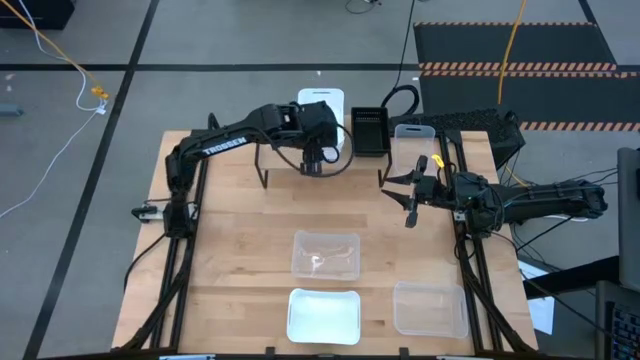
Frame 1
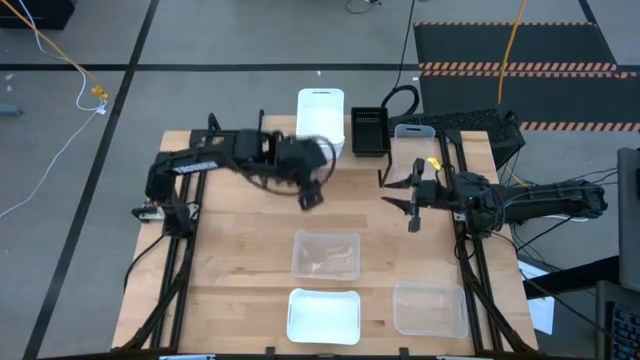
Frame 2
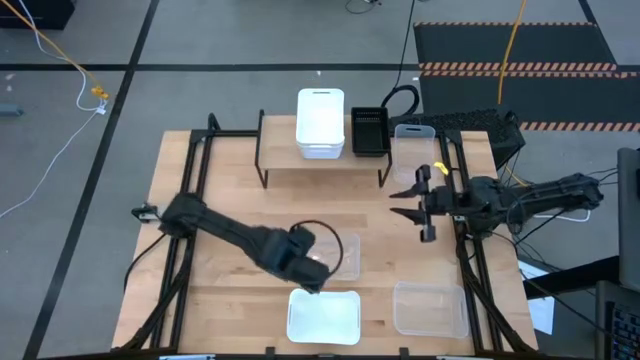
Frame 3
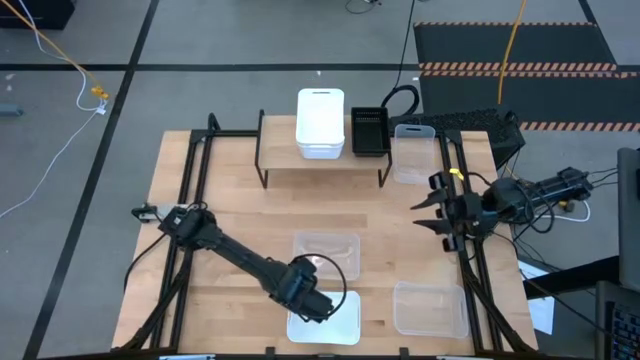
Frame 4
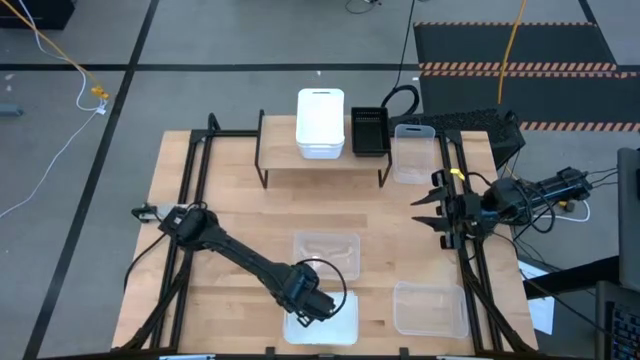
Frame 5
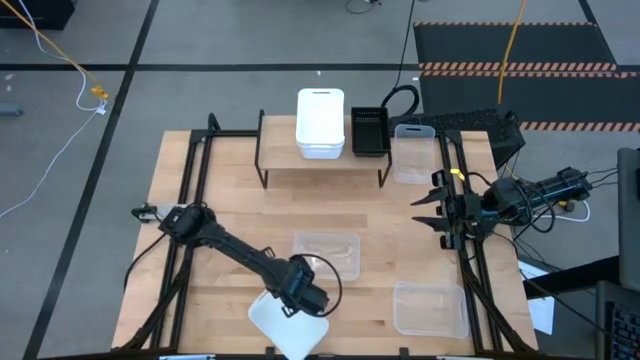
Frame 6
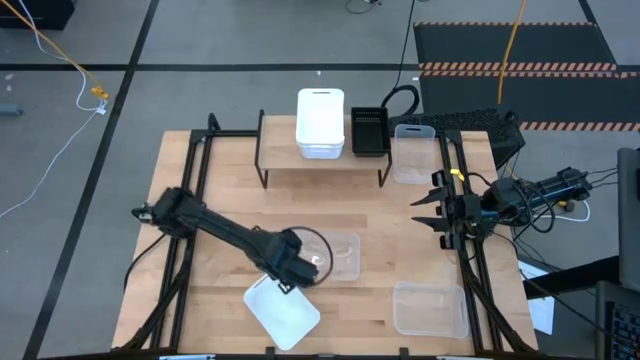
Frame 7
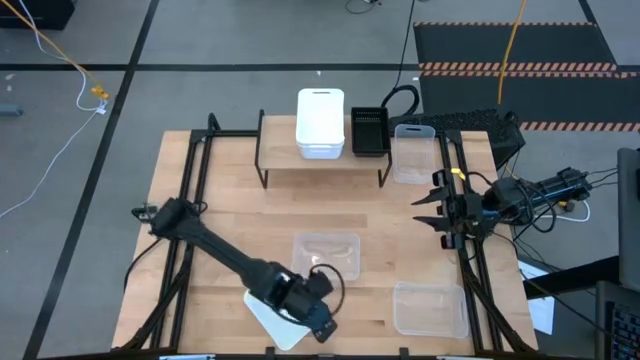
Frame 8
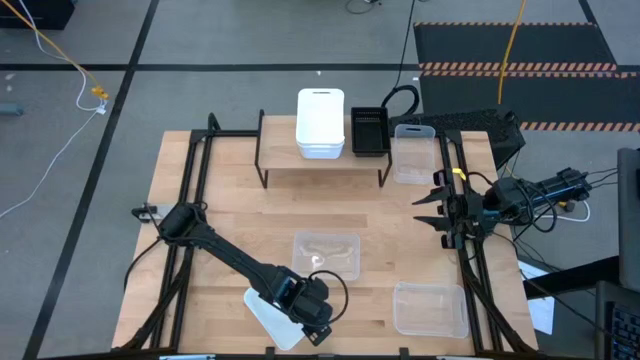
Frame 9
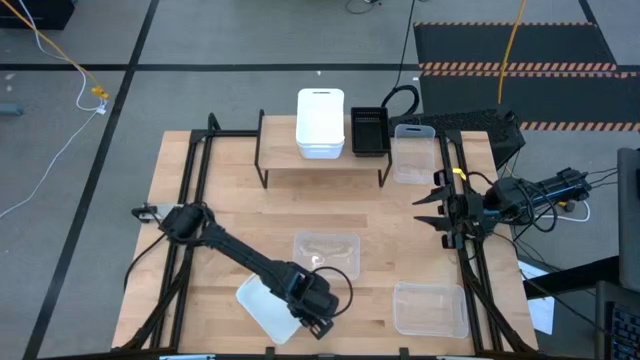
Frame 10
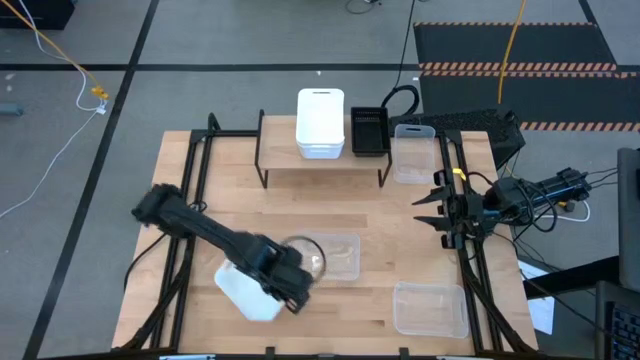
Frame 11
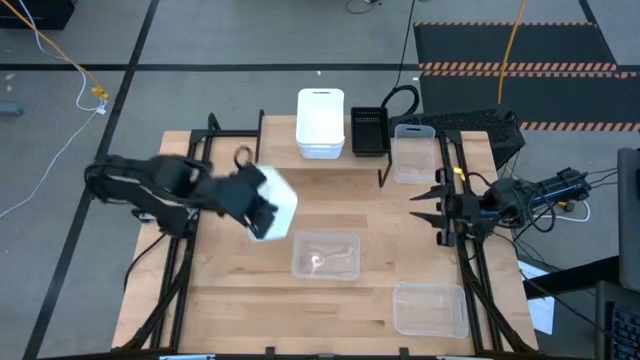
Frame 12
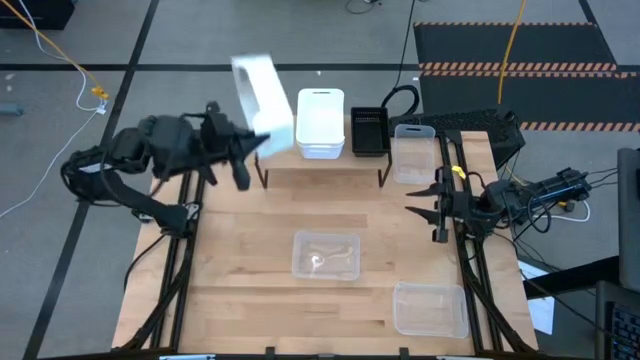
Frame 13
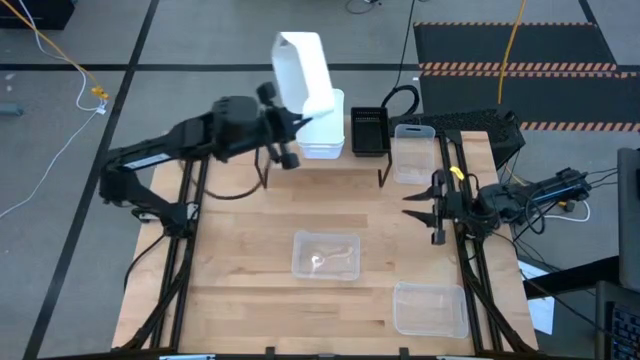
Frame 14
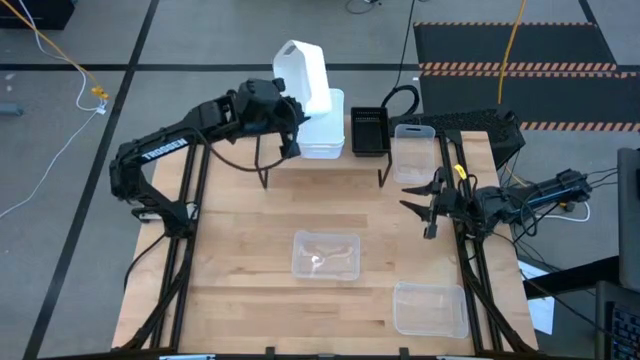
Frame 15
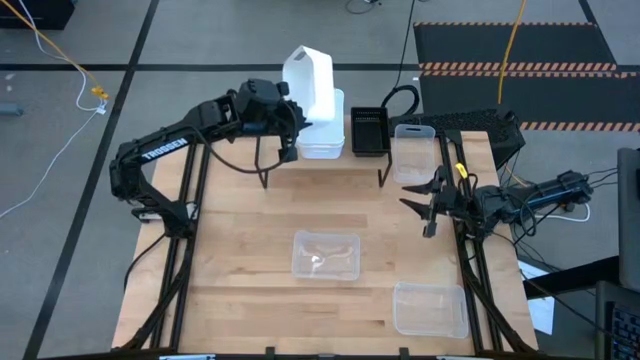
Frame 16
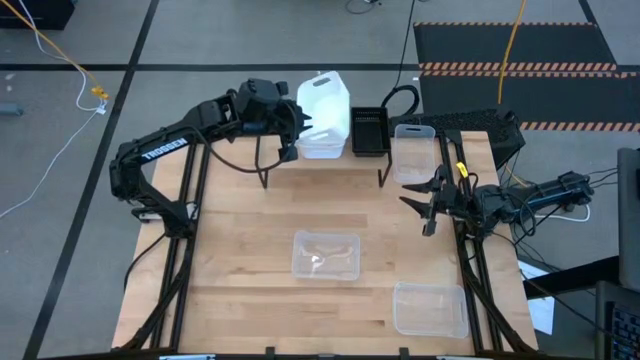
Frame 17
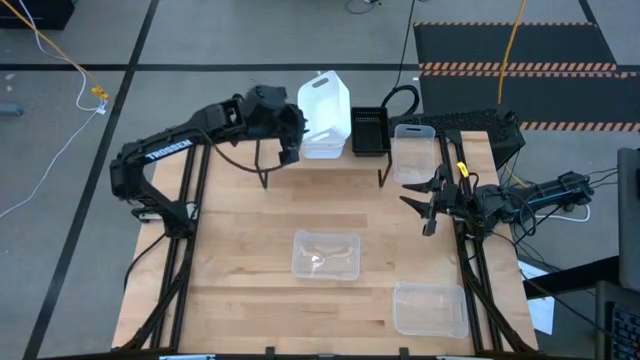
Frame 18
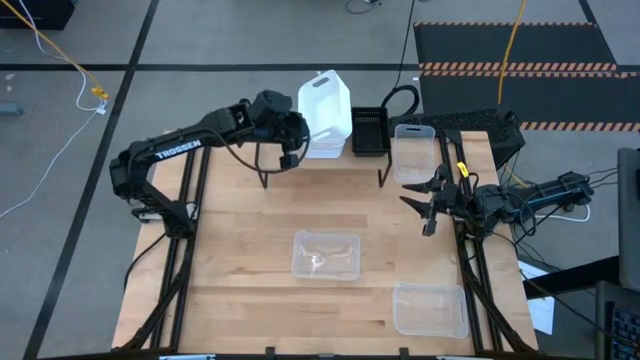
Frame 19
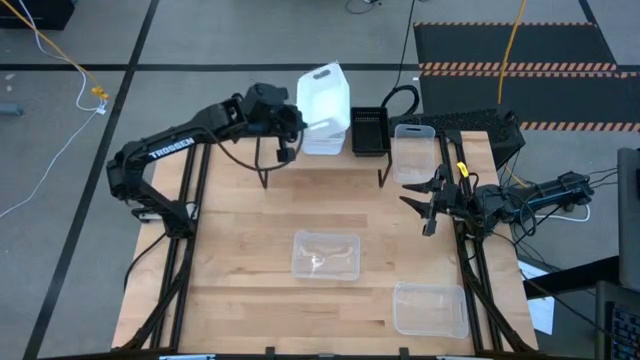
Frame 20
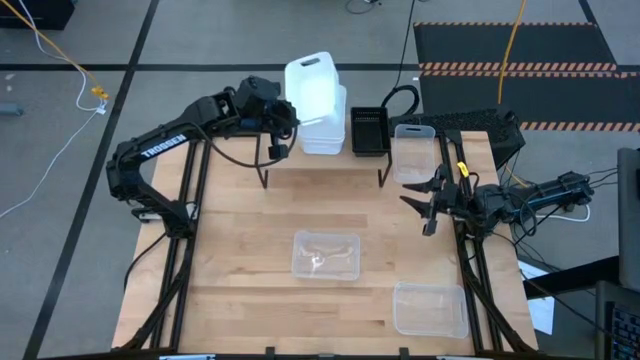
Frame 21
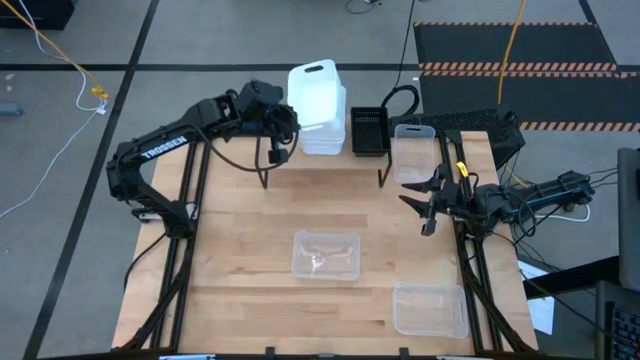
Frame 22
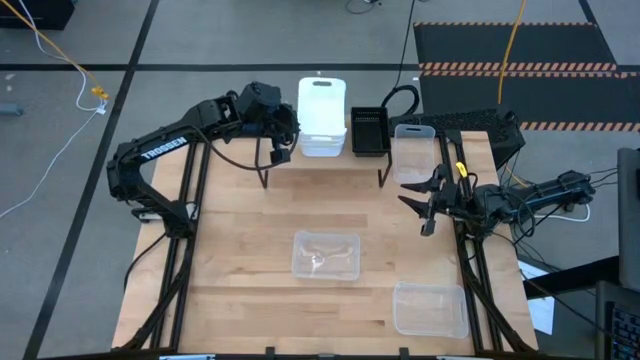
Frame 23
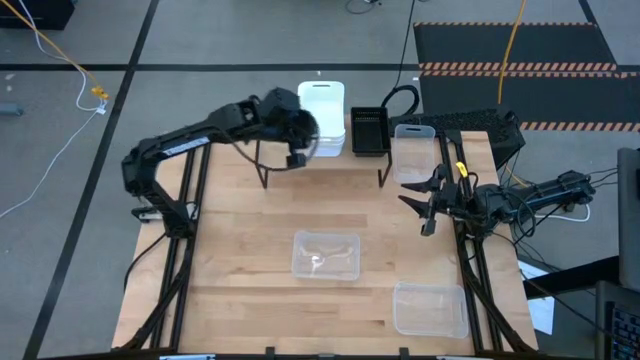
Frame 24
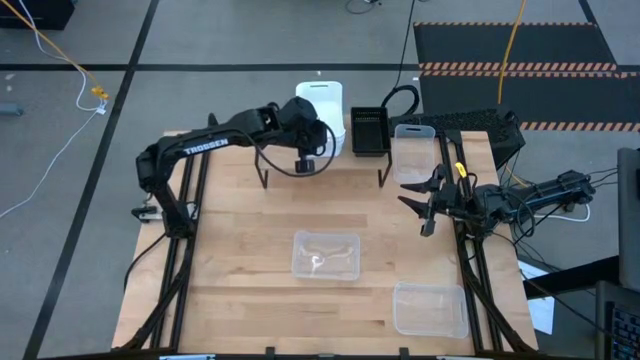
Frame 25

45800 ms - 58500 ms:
Task: Stack baskets on shelf by color
Stack the white bin on the white bin on the shelf

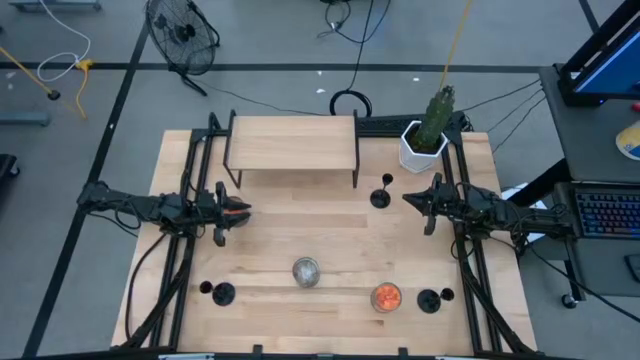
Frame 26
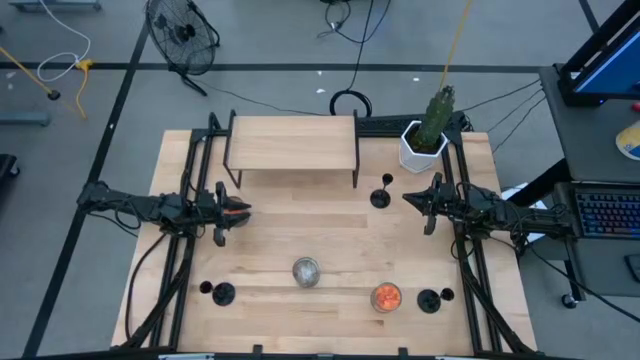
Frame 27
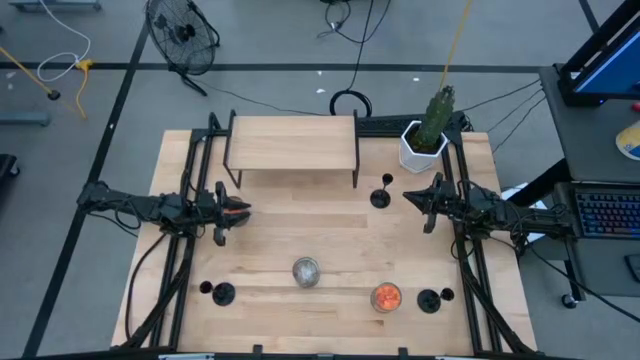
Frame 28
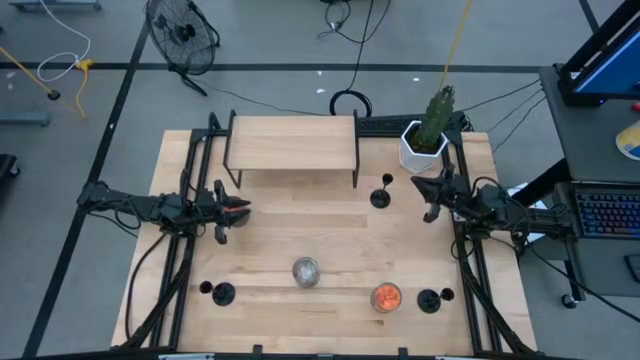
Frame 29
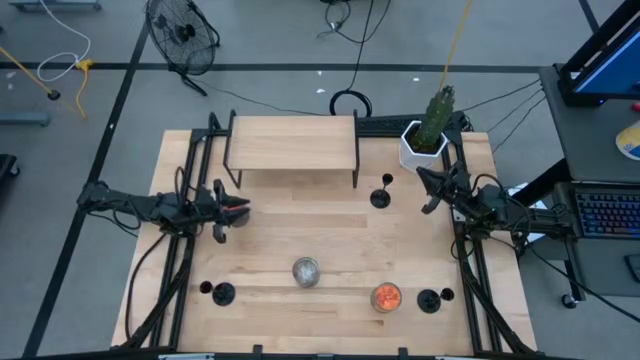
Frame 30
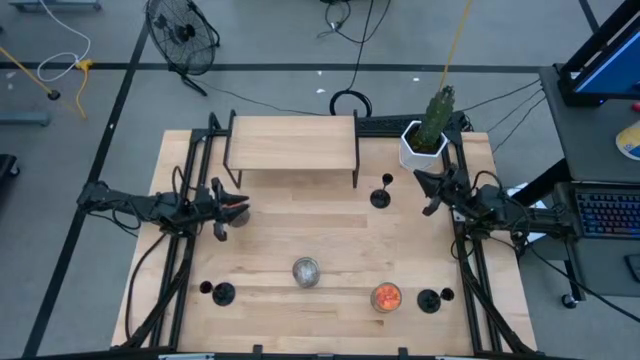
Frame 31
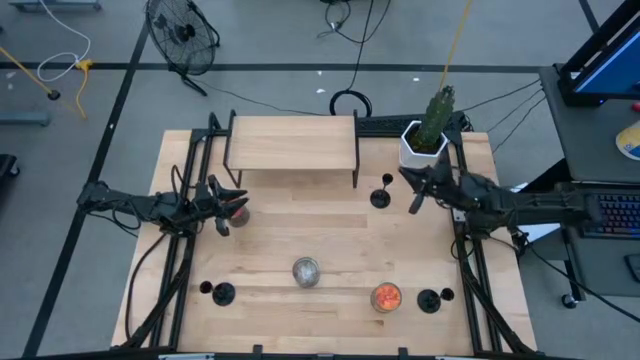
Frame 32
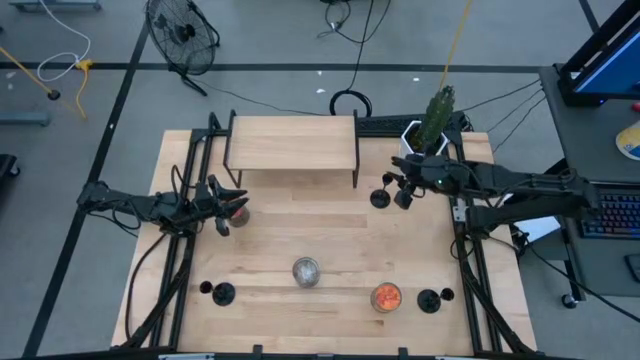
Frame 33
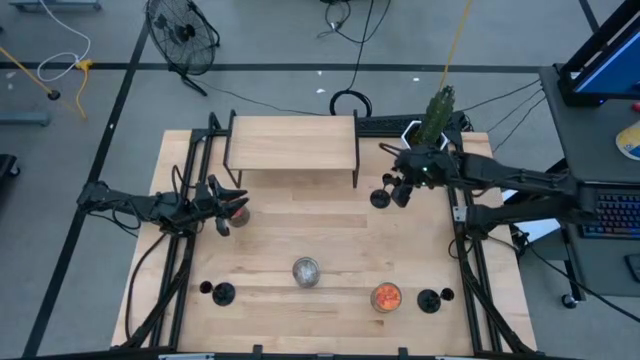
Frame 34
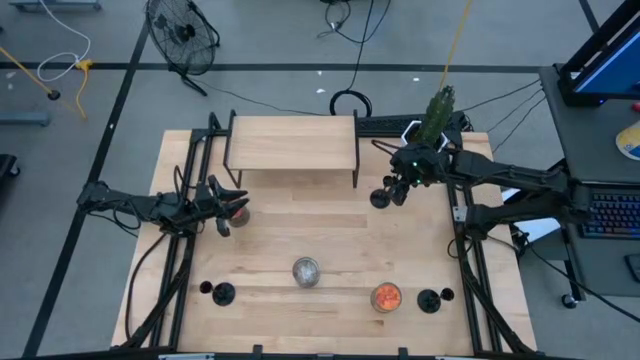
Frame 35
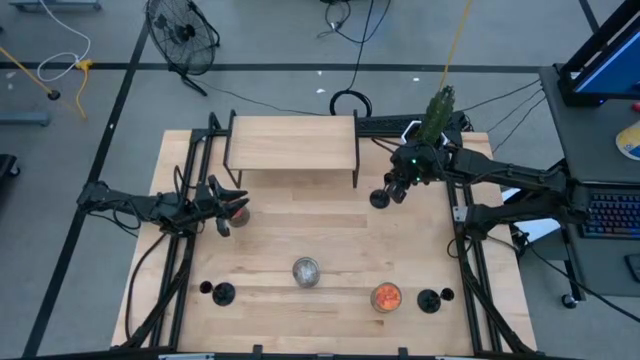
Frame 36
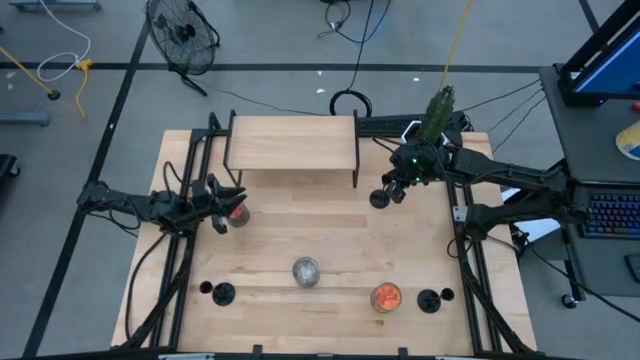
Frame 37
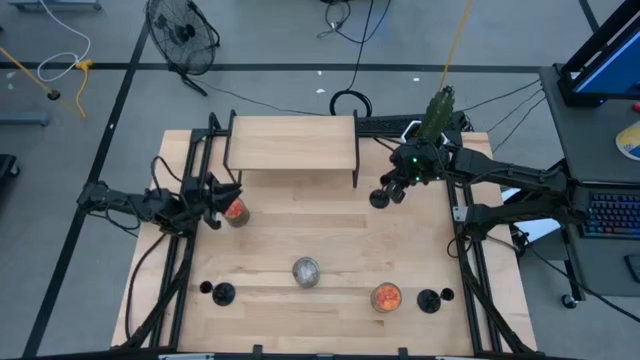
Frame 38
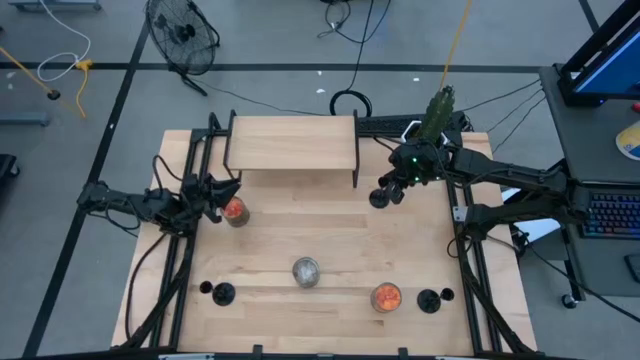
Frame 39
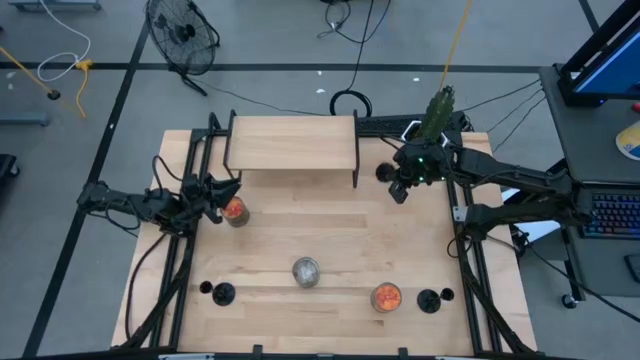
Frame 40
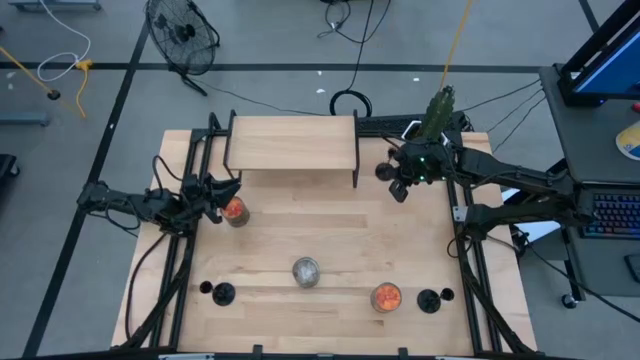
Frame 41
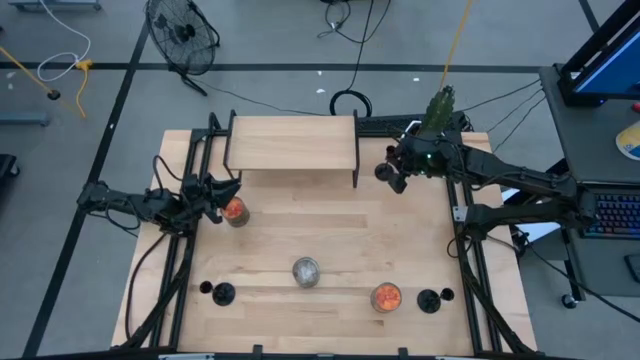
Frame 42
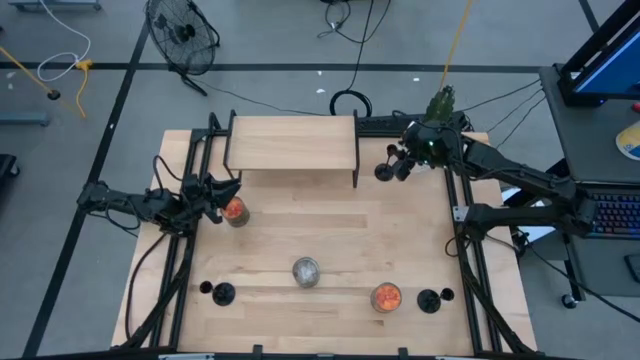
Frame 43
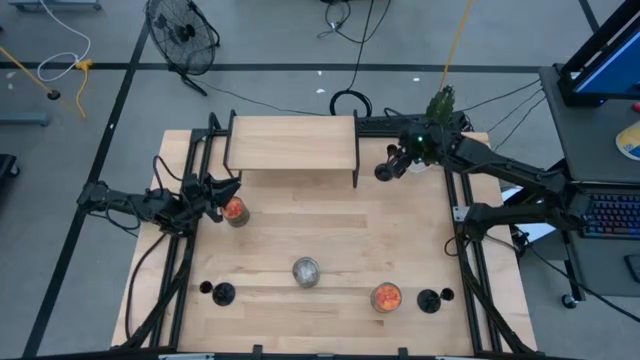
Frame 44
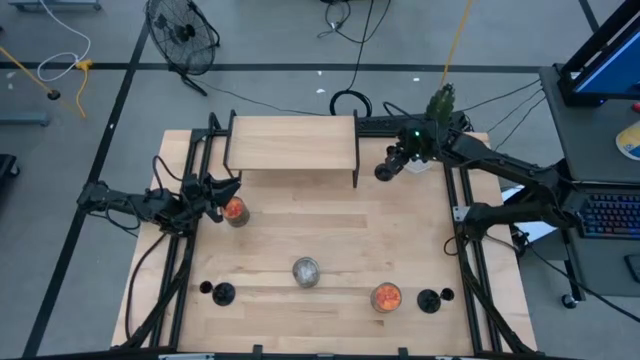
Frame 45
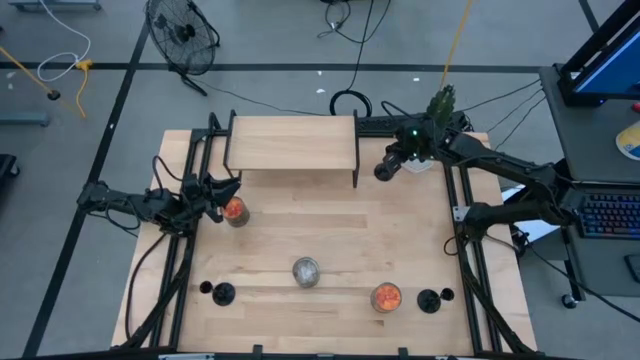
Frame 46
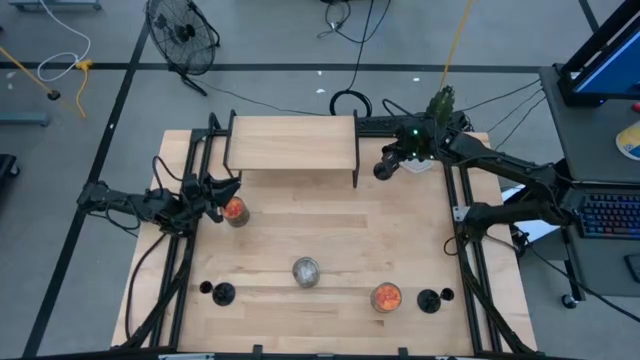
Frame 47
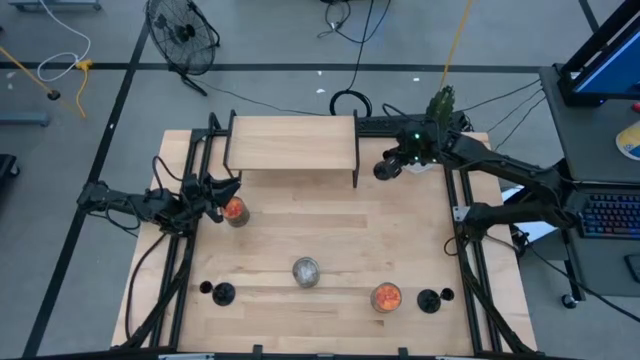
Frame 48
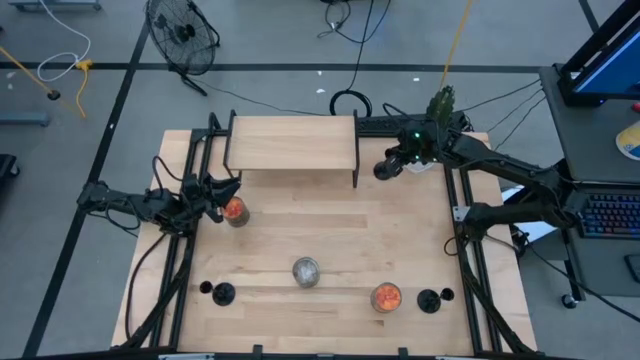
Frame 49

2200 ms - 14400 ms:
Task: Pick & Place candle stick holders
Put the top right black candle holder on the shelf
